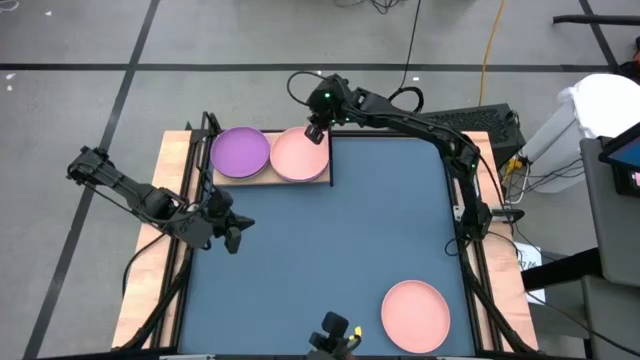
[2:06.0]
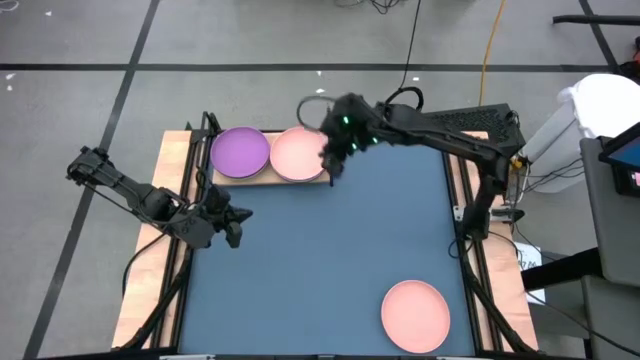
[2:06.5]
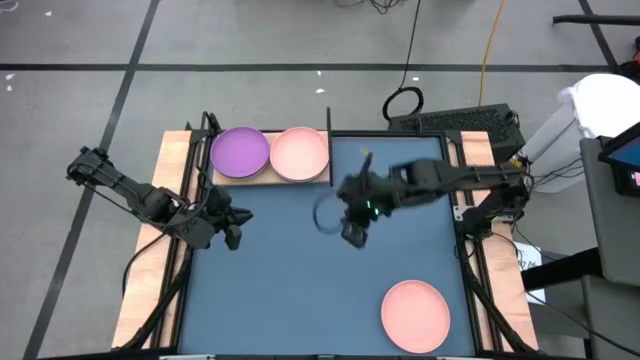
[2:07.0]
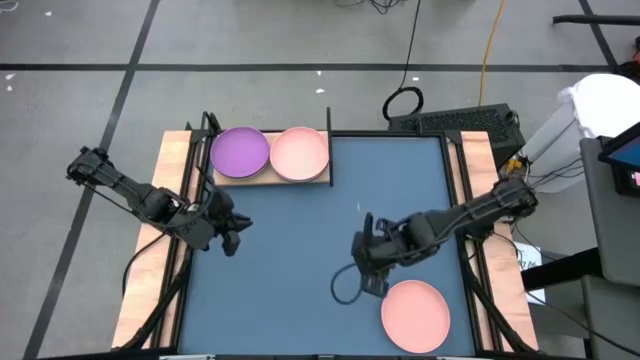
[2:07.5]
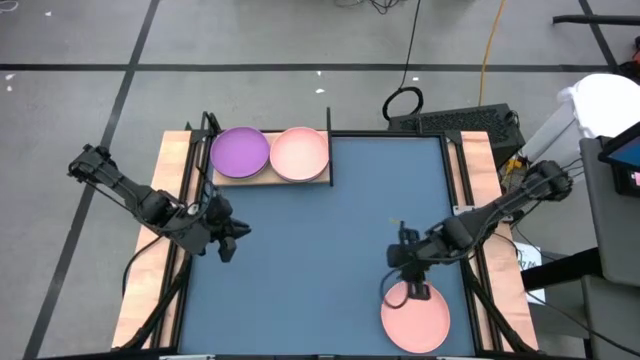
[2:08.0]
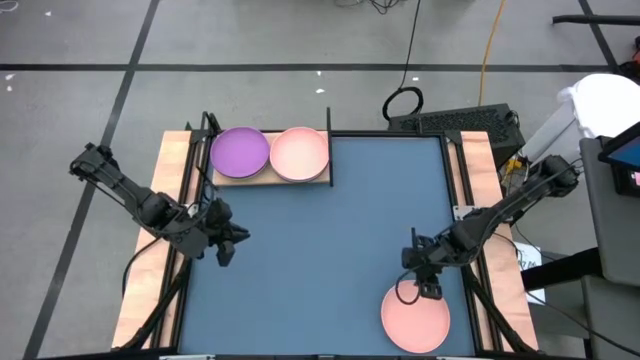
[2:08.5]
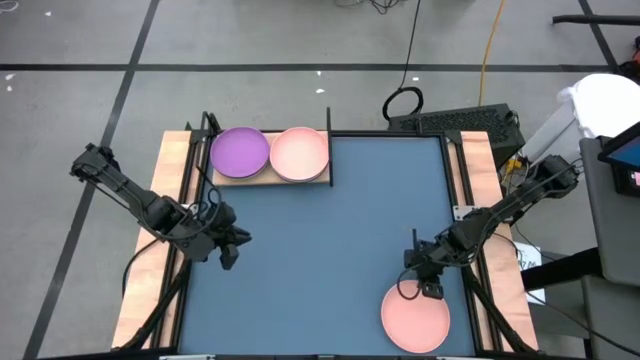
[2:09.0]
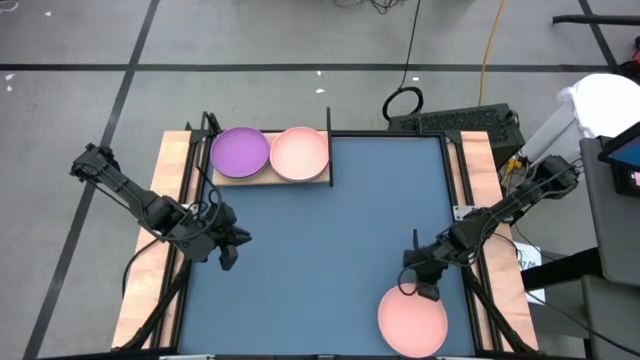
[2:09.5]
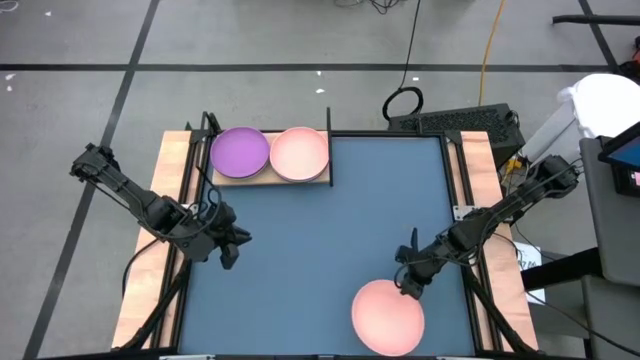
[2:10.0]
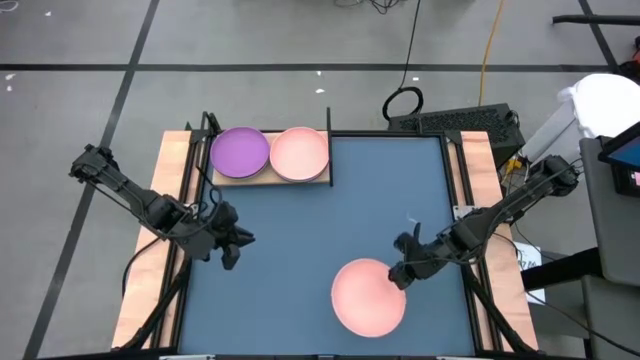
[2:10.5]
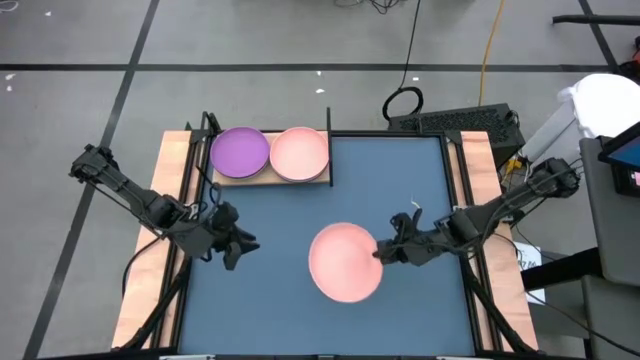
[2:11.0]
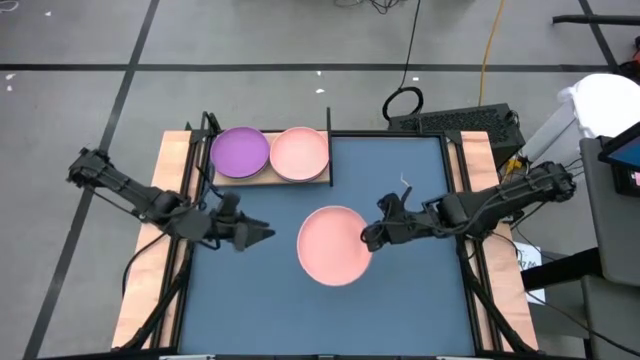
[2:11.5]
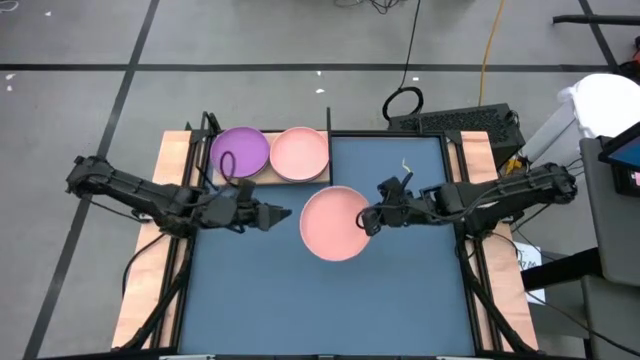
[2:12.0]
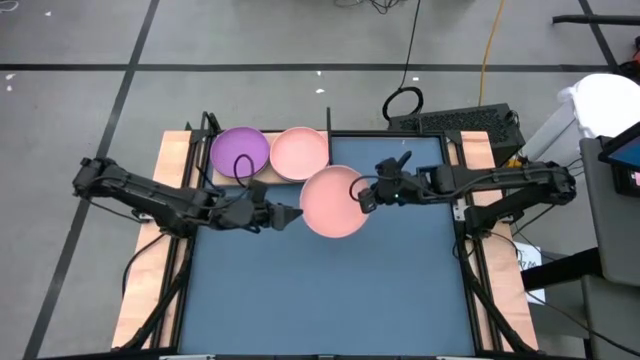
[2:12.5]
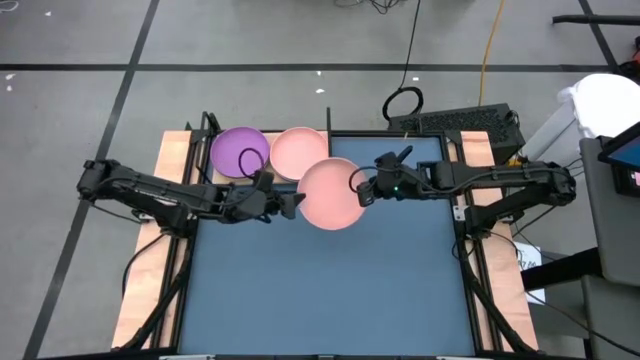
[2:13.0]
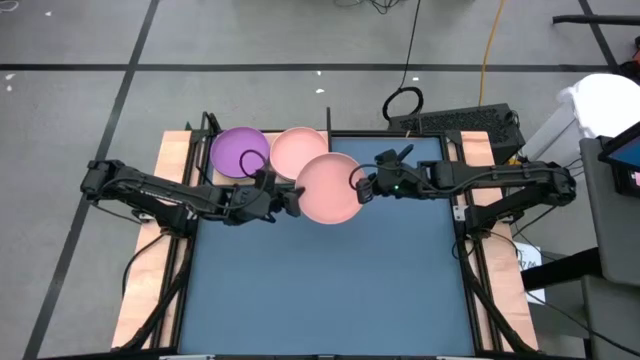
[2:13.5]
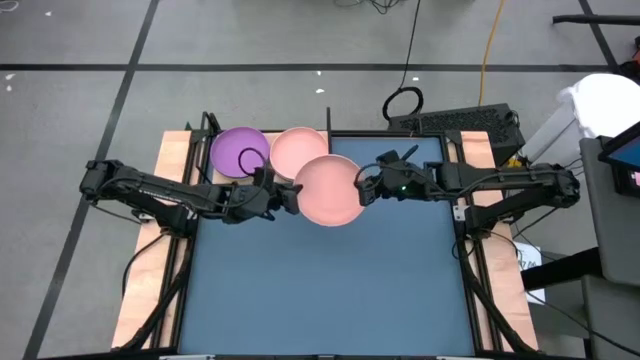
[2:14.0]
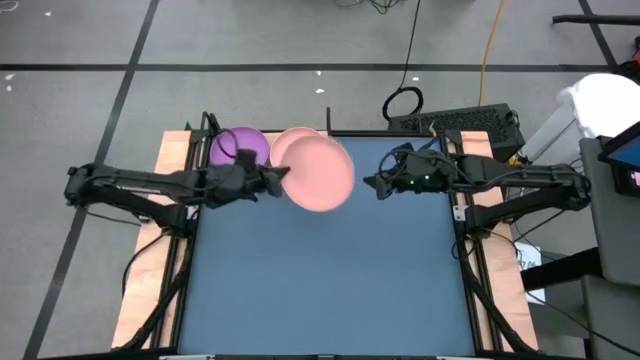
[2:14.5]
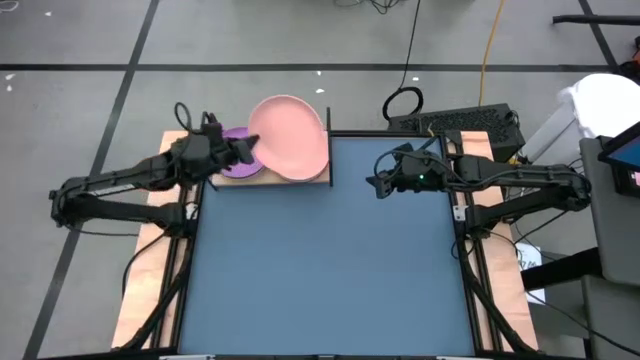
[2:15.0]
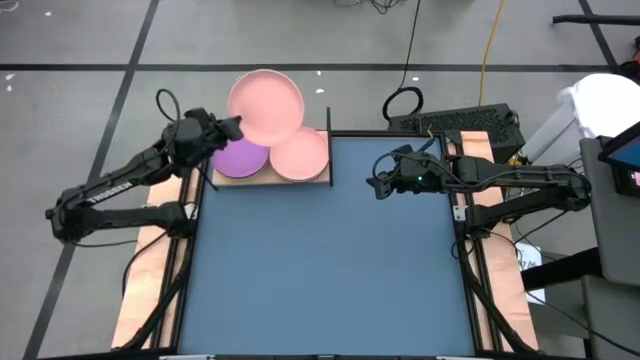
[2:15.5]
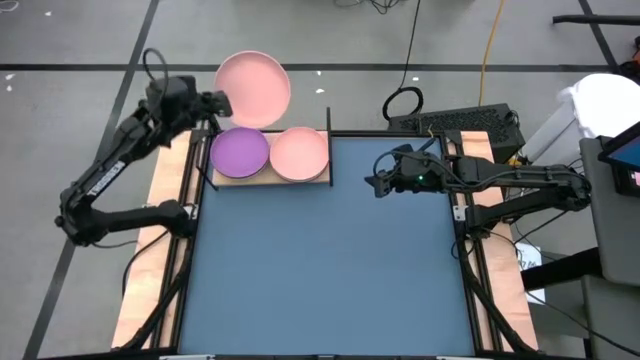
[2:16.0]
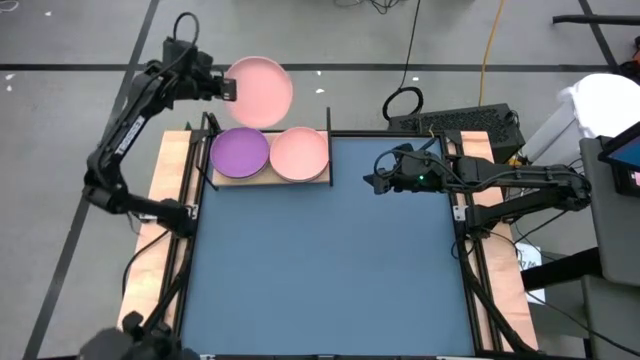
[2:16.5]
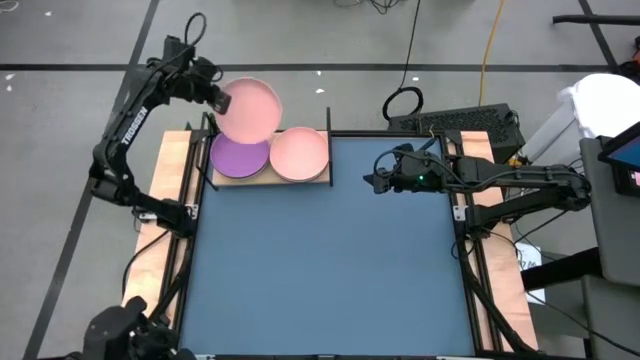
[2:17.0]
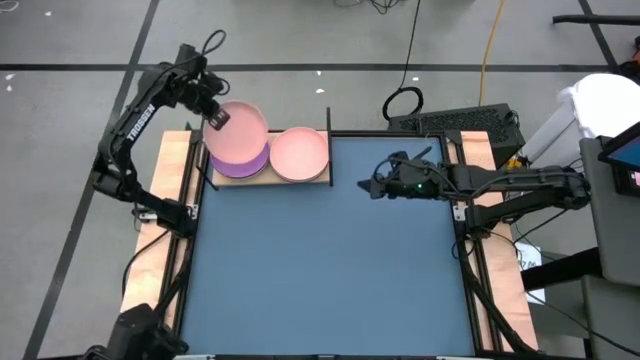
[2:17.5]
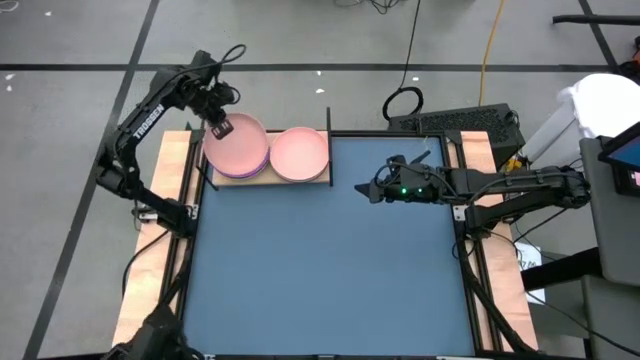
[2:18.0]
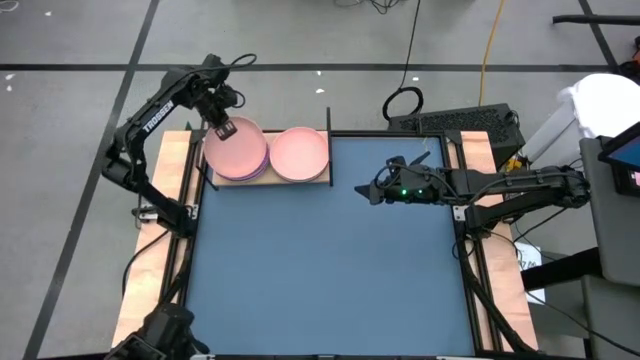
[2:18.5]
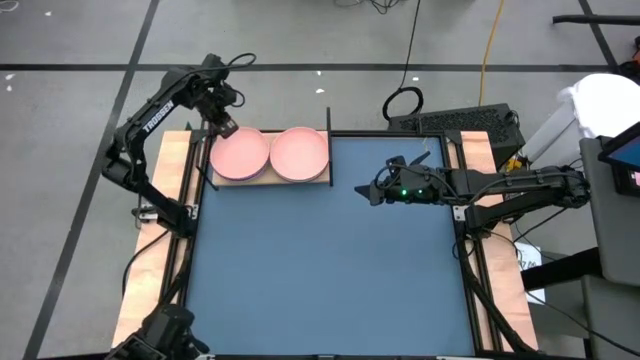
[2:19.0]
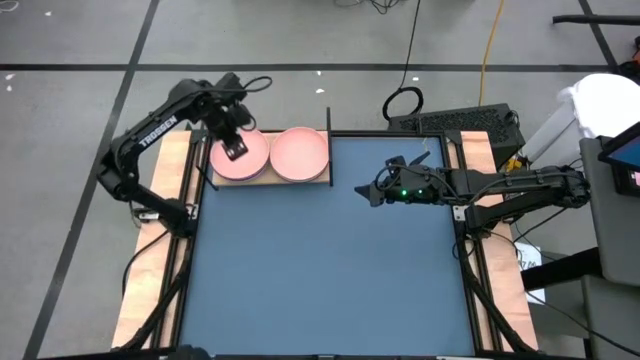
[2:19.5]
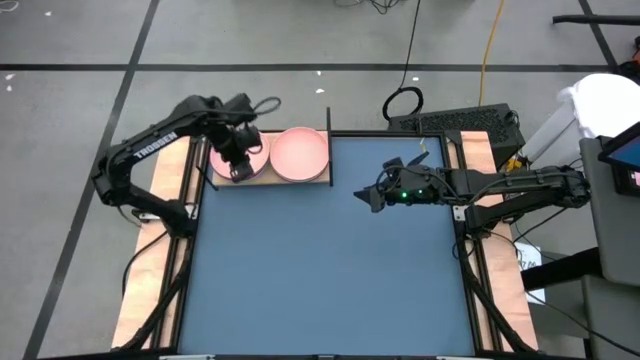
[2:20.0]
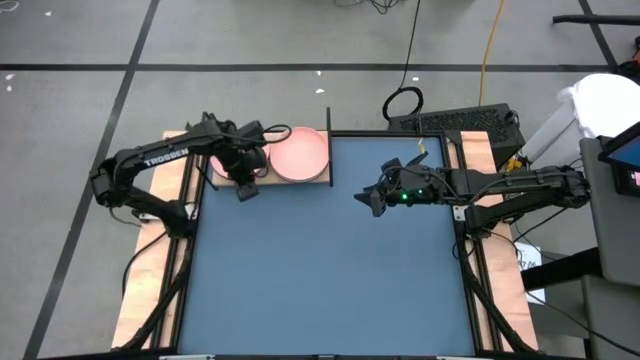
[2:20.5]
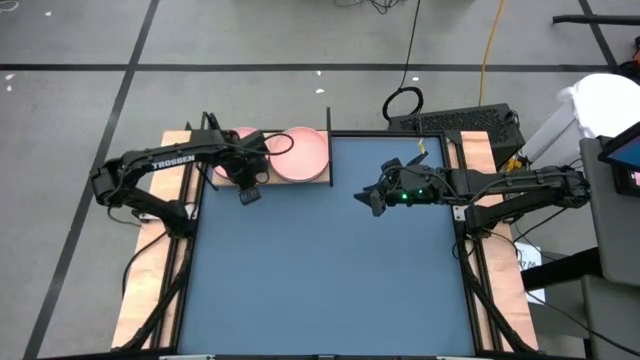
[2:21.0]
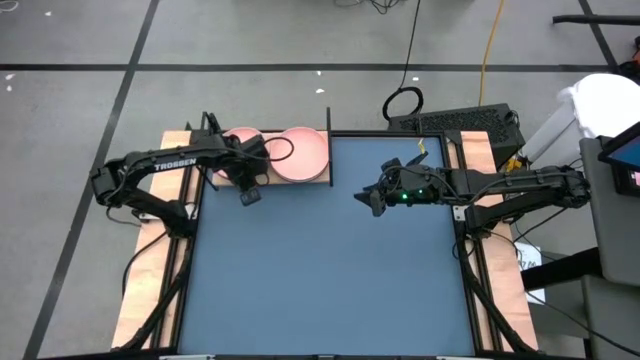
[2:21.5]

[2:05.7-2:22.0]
Task: Place and stack plates onto a shelf
Stack the light orange plate on top of the violet plate on the shelf

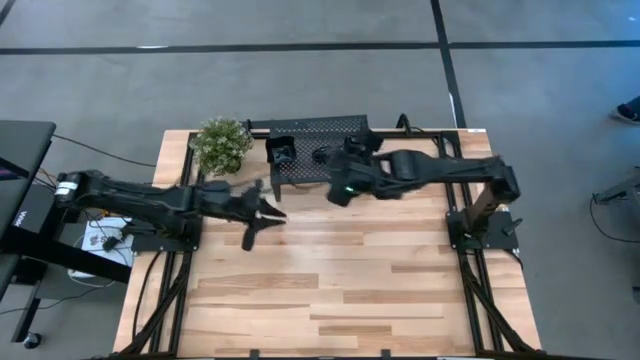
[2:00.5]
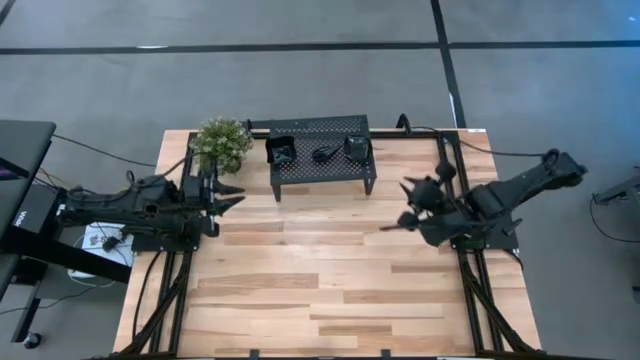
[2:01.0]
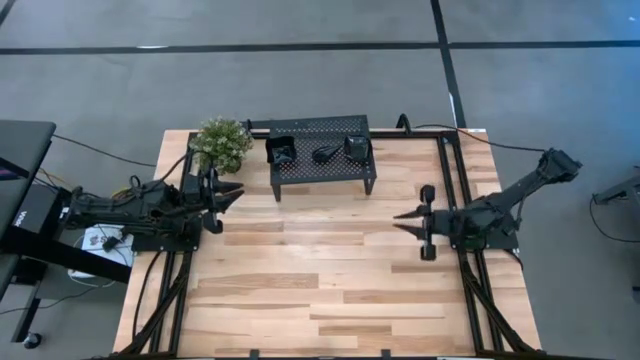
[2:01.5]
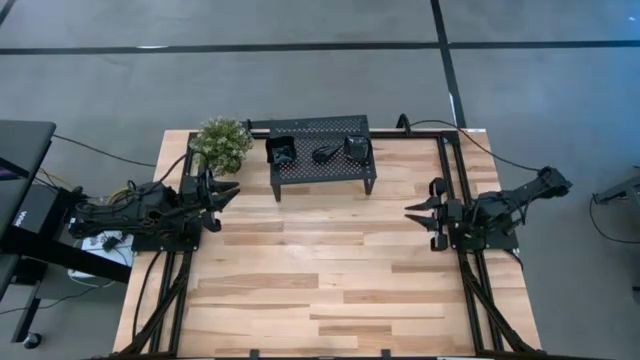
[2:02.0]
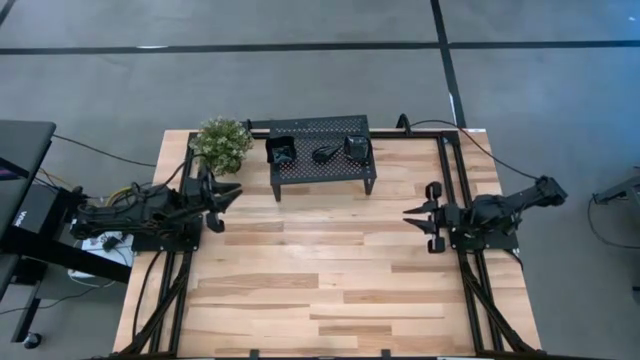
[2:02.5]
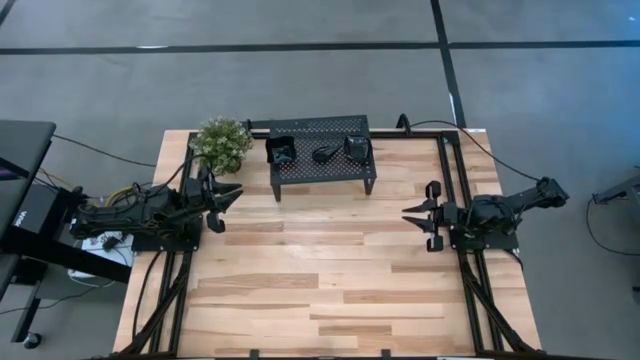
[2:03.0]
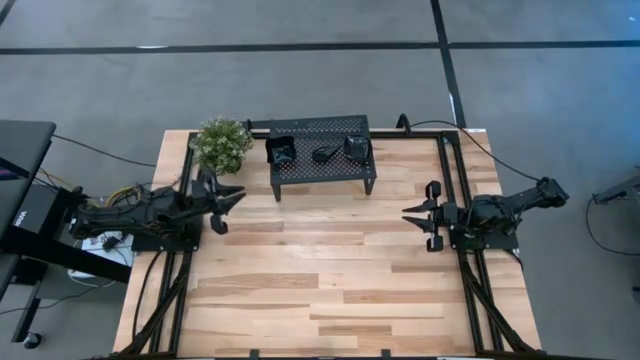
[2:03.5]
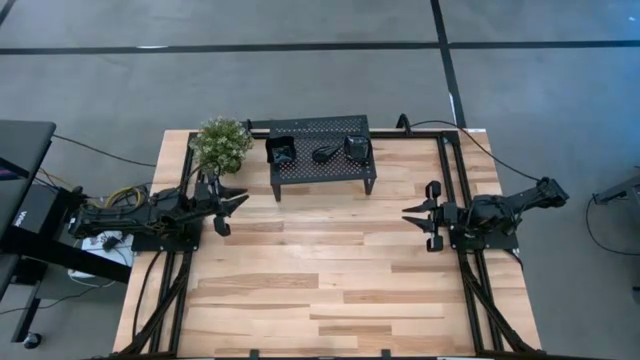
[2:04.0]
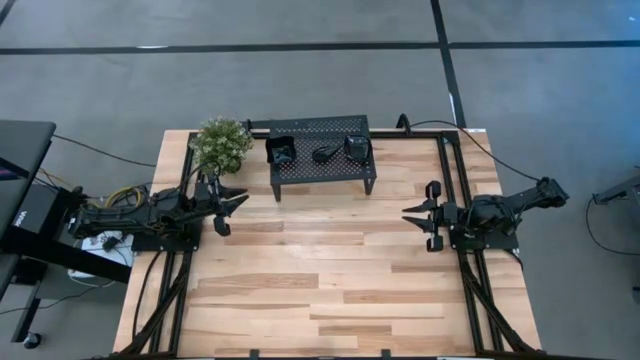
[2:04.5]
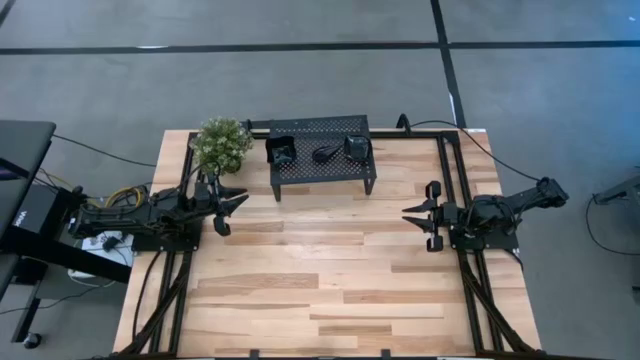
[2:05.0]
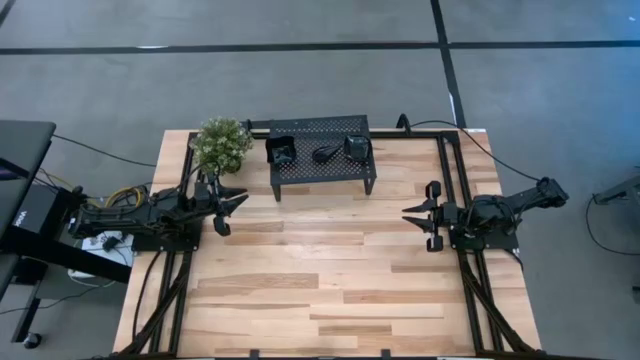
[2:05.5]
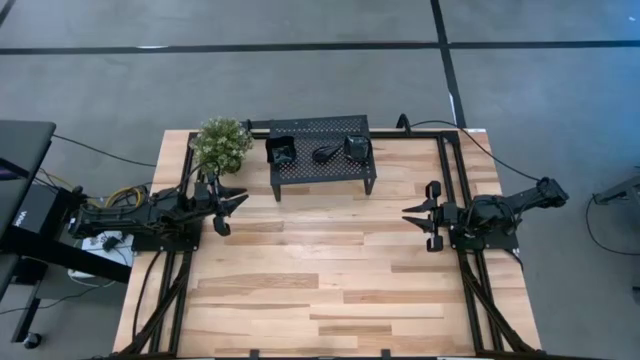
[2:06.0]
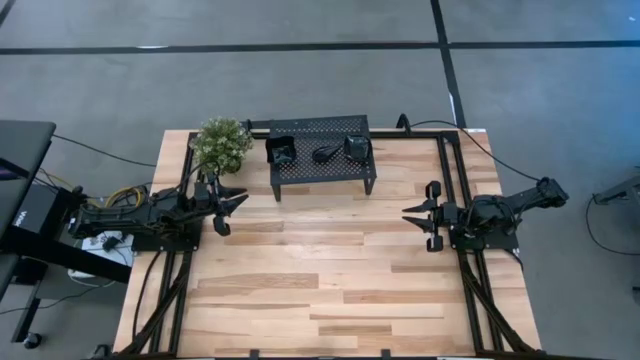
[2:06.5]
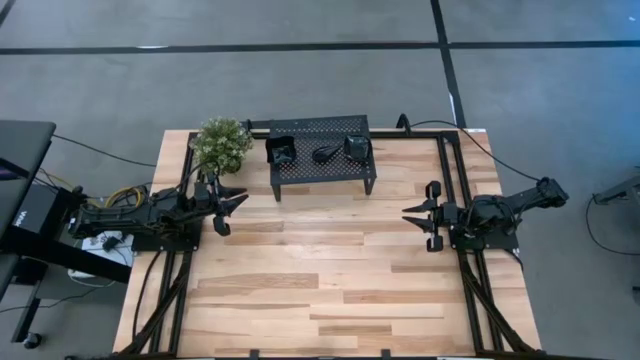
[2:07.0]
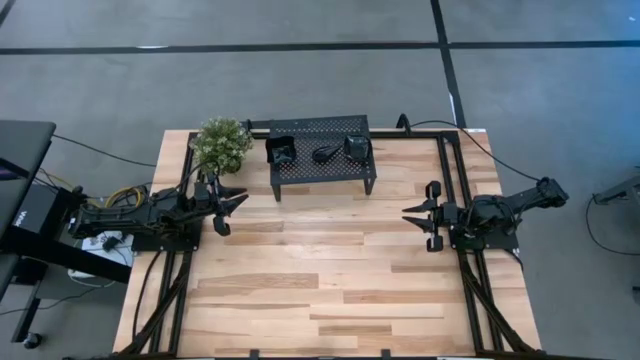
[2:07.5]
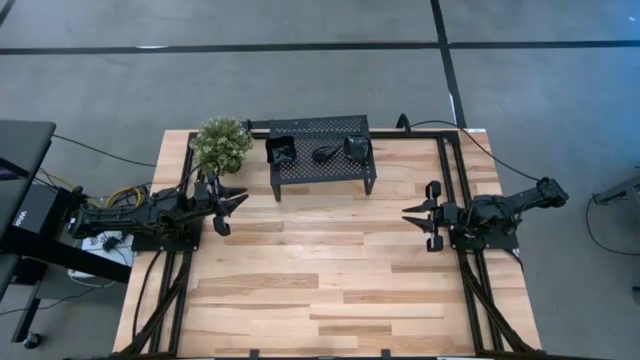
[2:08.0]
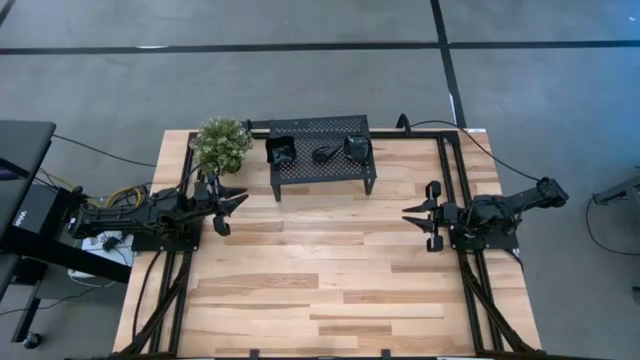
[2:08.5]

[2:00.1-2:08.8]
Task: Pick & Place Mini shaped plates
Return to Home Position
